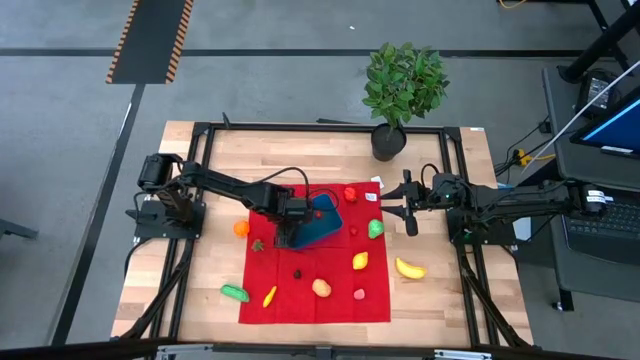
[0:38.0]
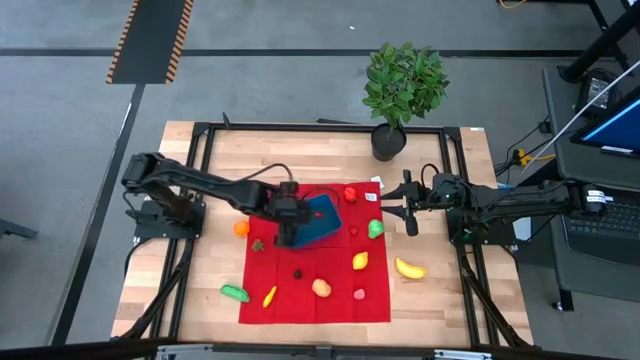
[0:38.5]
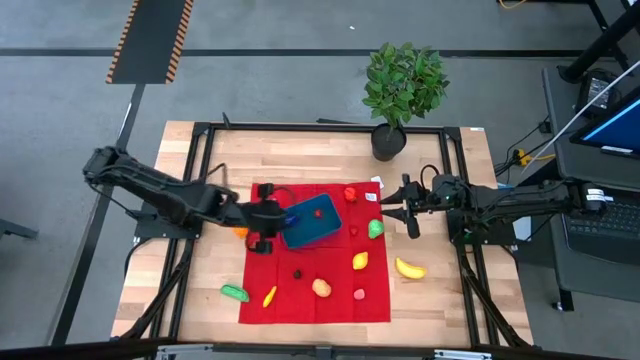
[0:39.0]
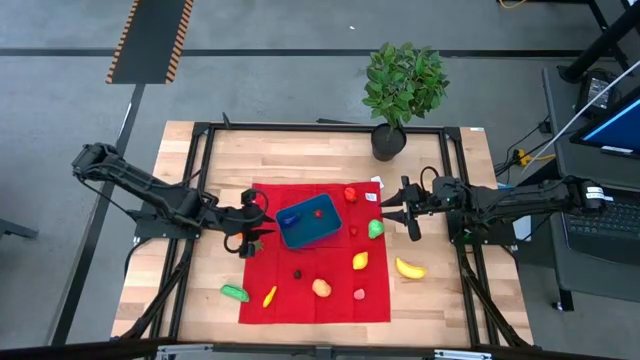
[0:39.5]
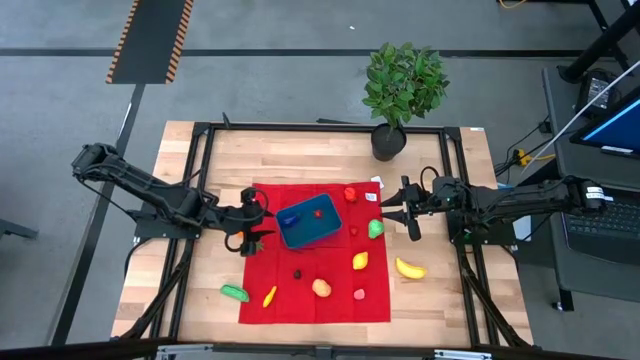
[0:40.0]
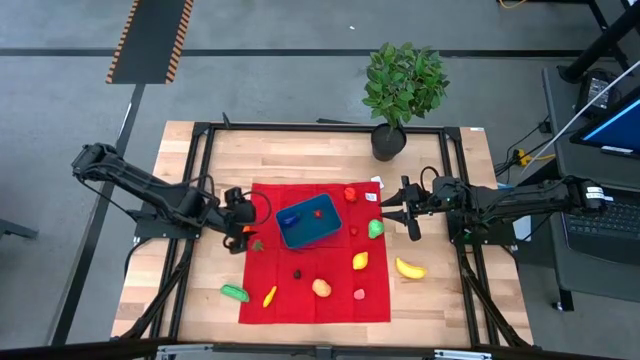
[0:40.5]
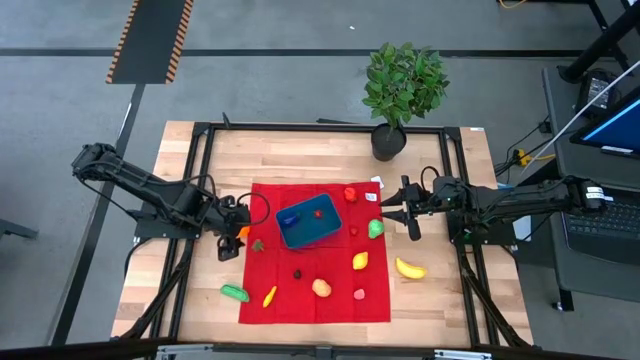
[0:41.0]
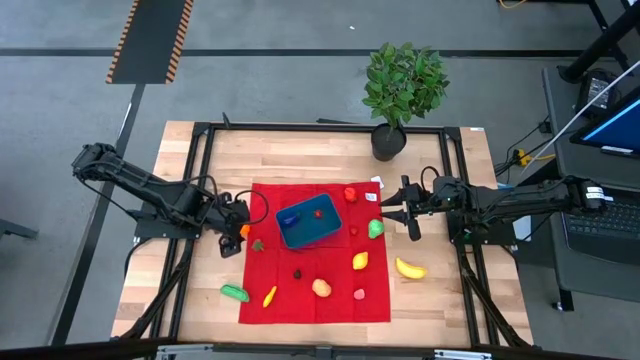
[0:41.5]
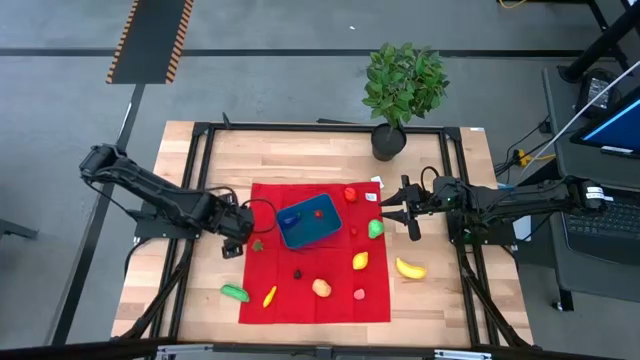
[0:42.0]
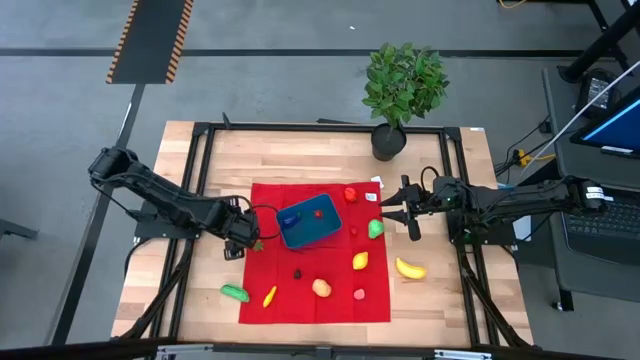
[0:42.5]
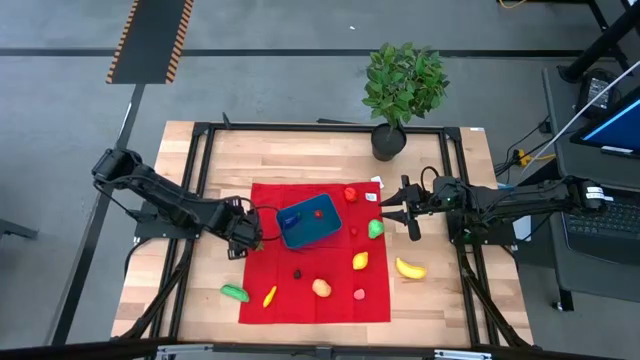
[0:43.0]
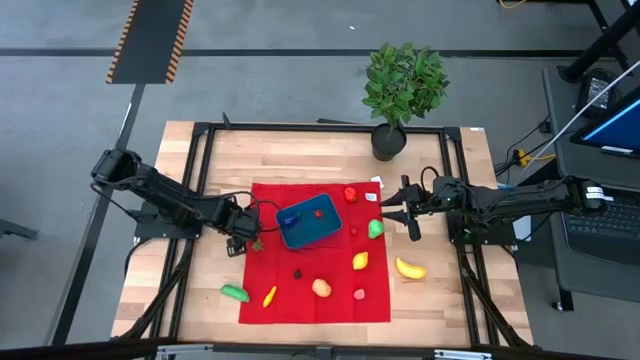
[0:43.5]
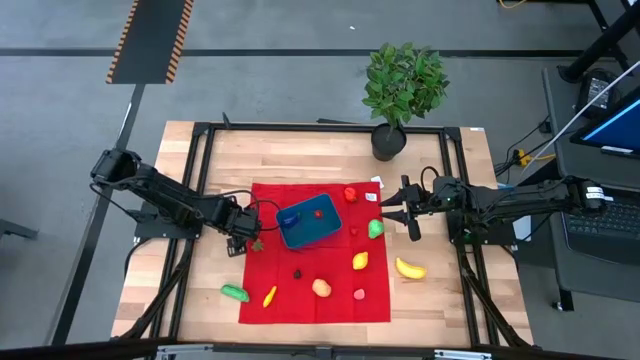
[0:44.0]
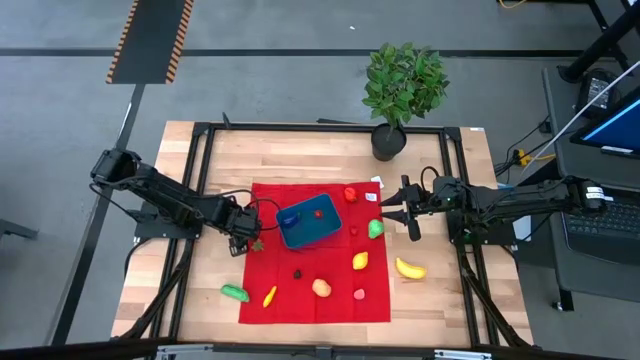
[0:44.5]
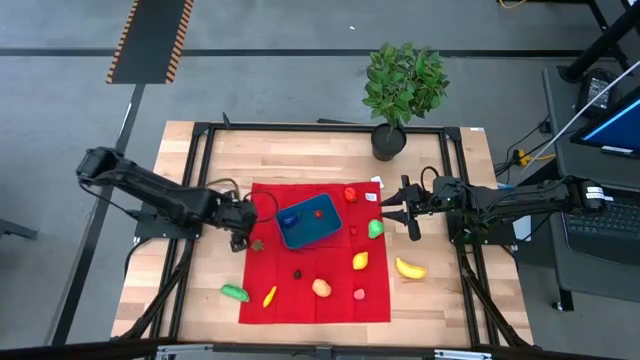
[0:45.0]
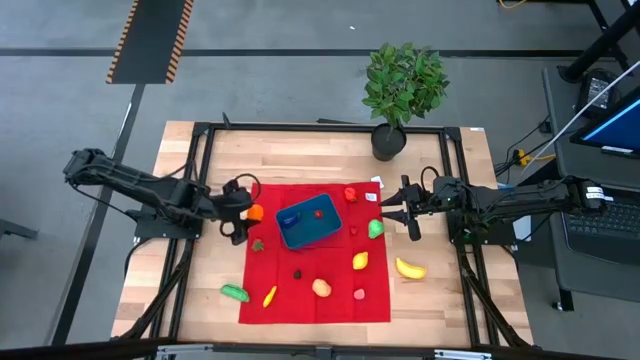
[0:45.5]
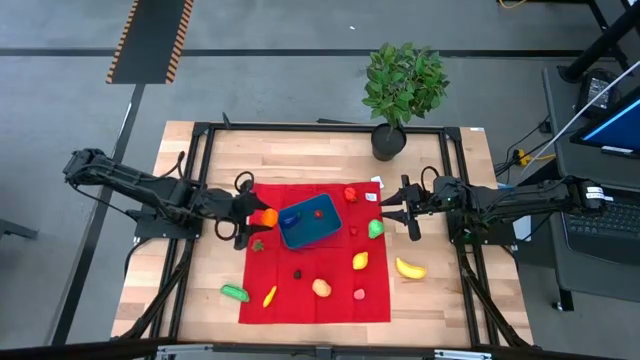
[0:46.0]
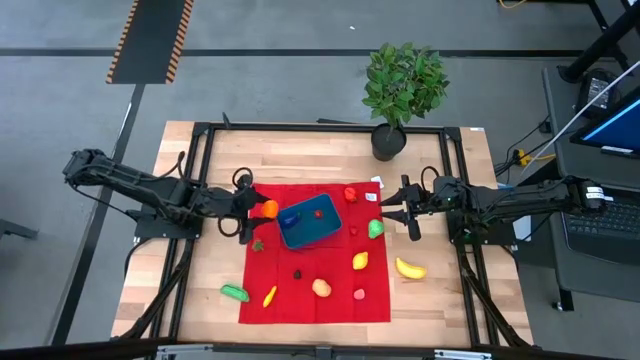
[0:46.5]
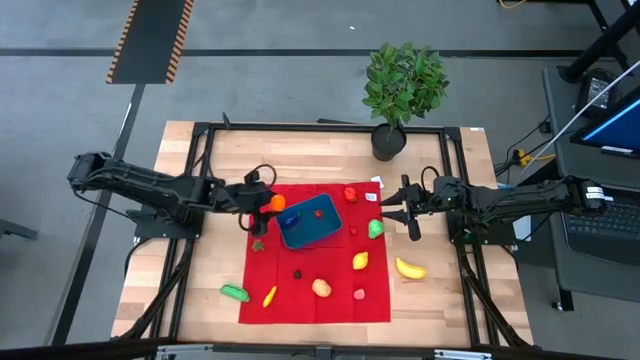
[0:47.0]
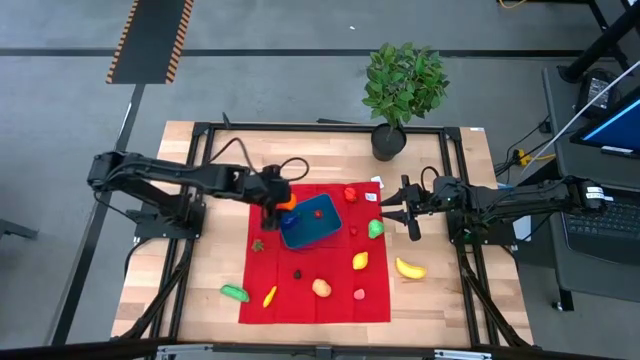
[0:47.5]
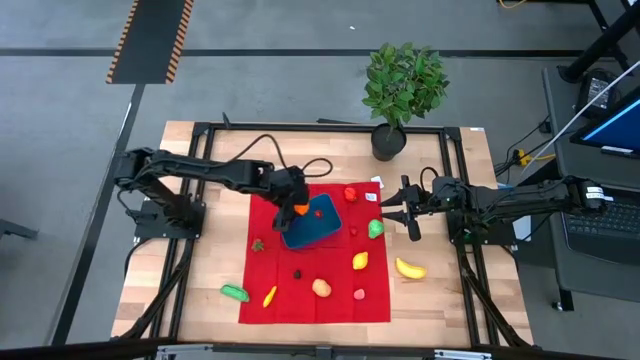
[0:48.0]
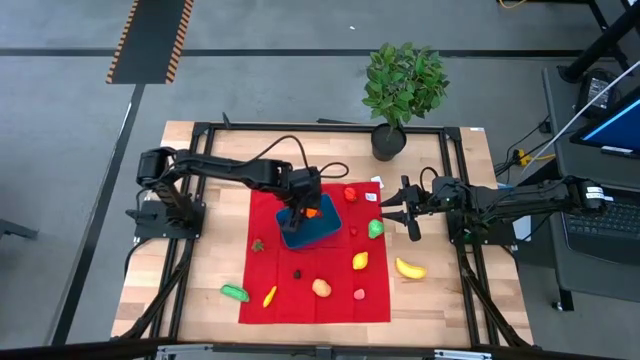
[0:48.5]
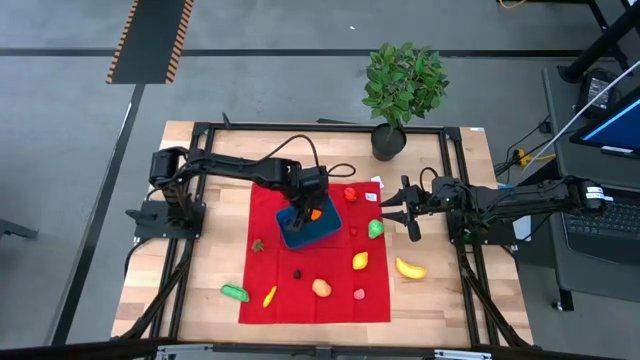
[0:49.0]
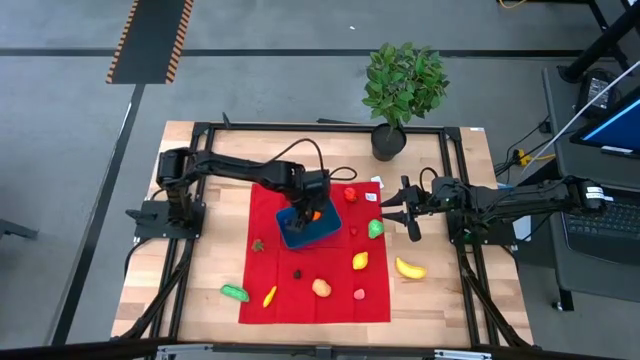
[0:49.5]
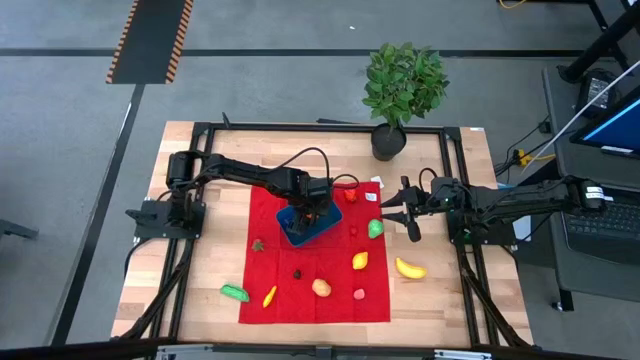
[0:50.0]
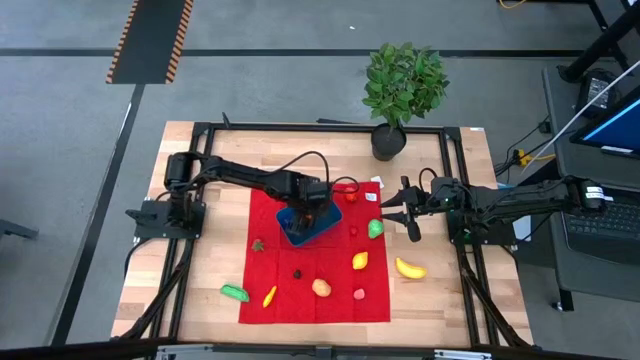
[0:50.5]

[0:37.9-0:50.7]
Task: Pick and placing Produce into tupperware
Put the pumpkin into the blue bin

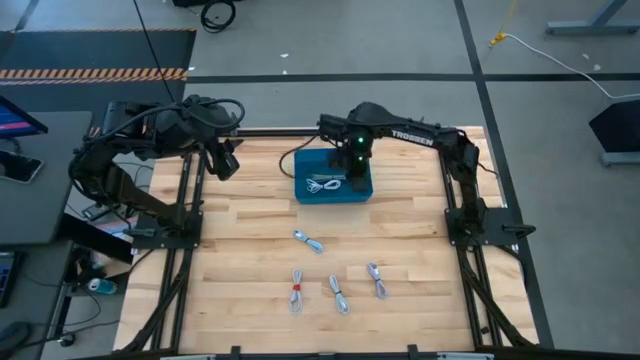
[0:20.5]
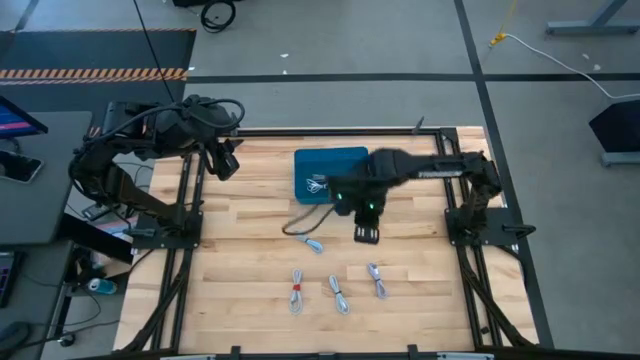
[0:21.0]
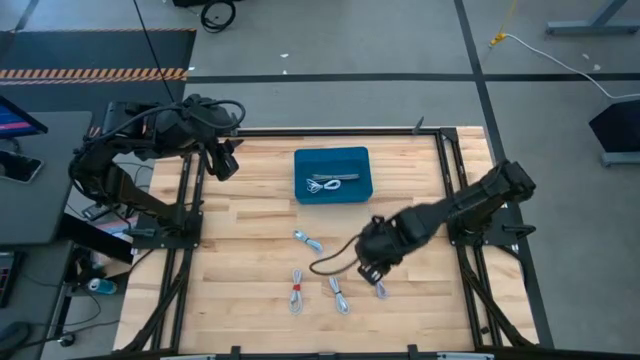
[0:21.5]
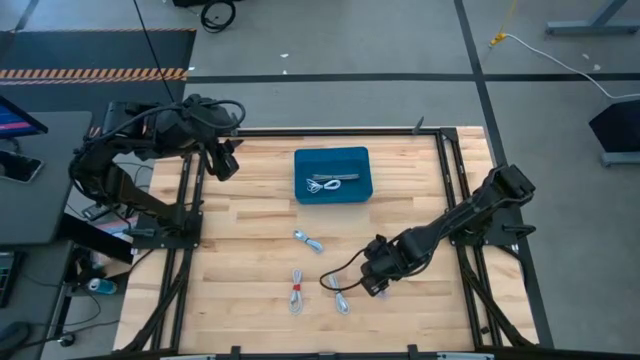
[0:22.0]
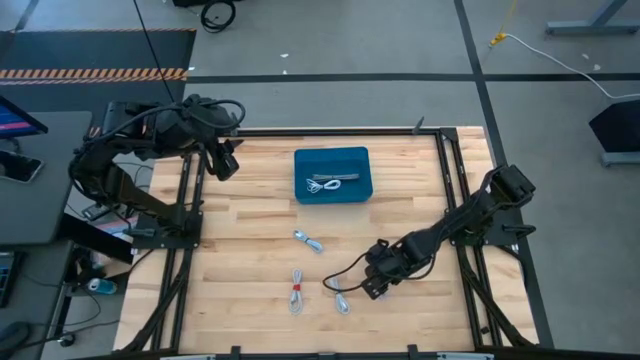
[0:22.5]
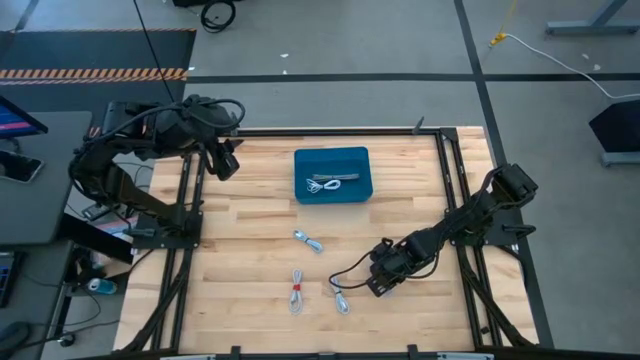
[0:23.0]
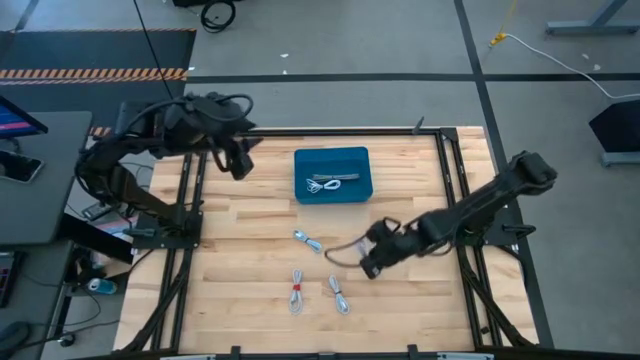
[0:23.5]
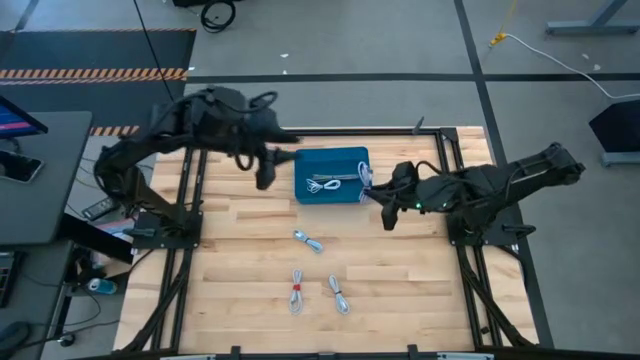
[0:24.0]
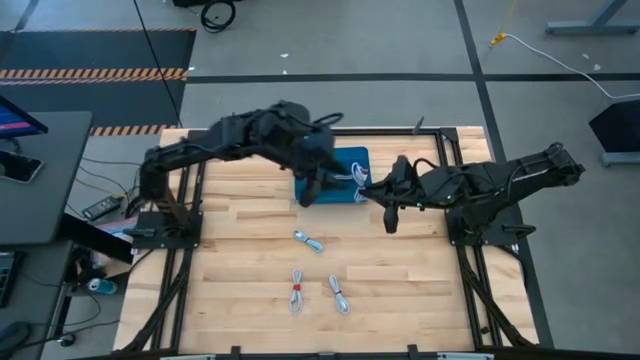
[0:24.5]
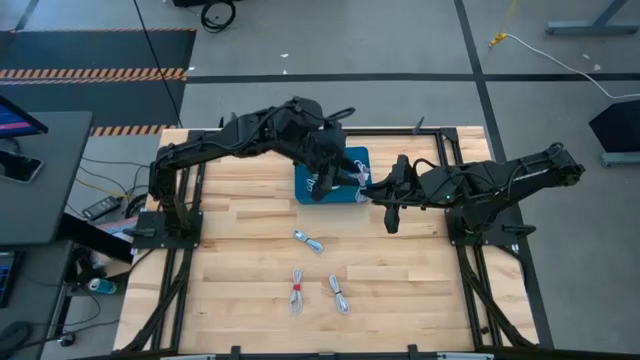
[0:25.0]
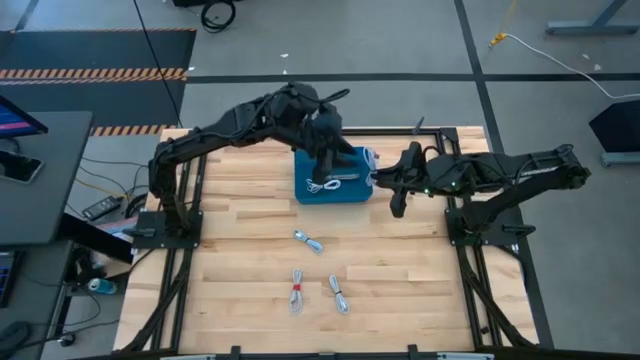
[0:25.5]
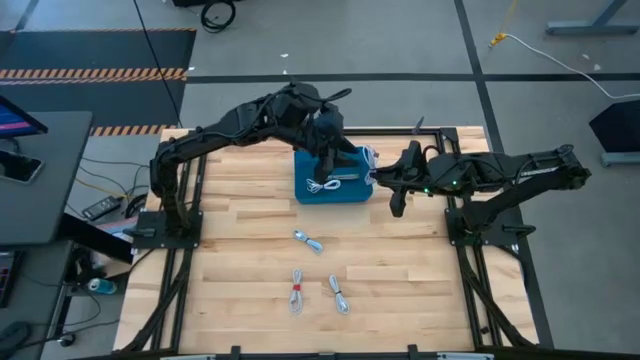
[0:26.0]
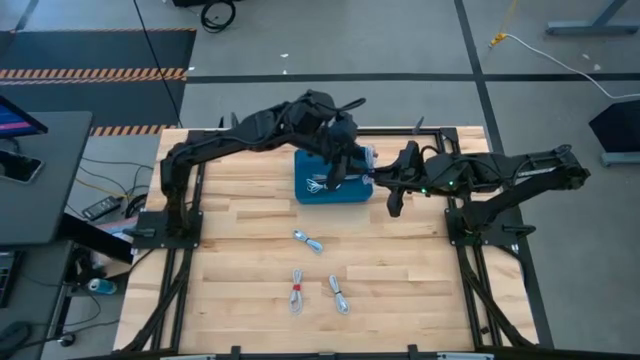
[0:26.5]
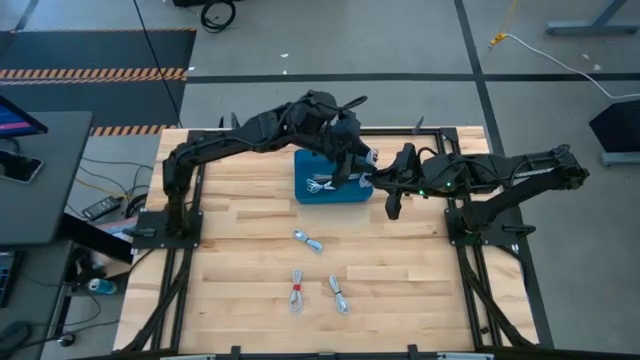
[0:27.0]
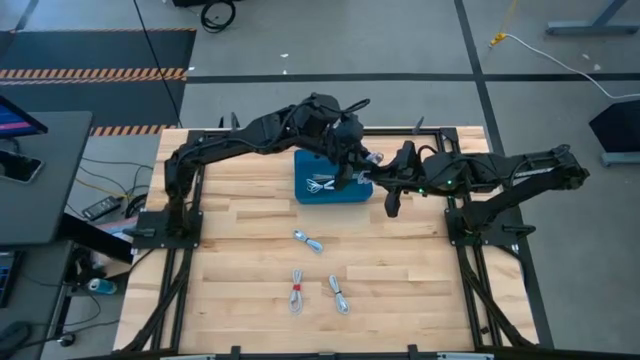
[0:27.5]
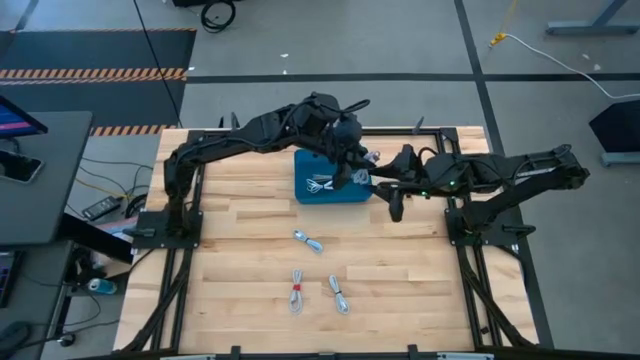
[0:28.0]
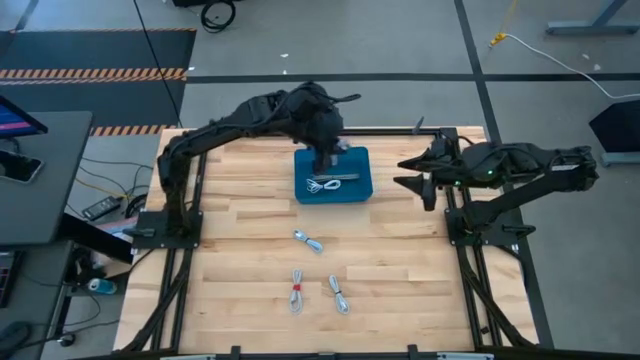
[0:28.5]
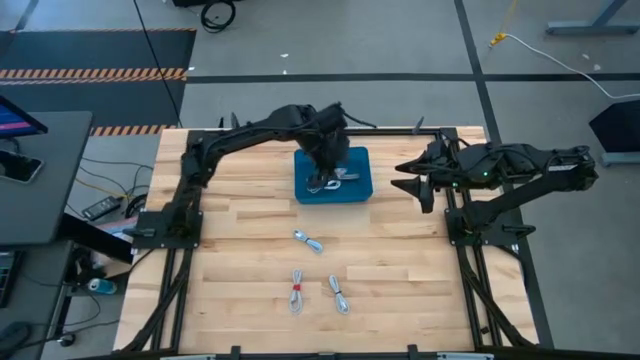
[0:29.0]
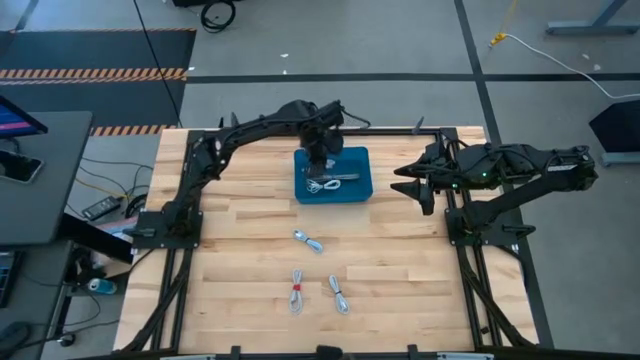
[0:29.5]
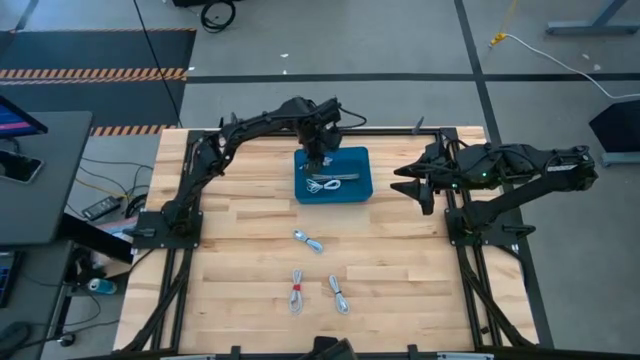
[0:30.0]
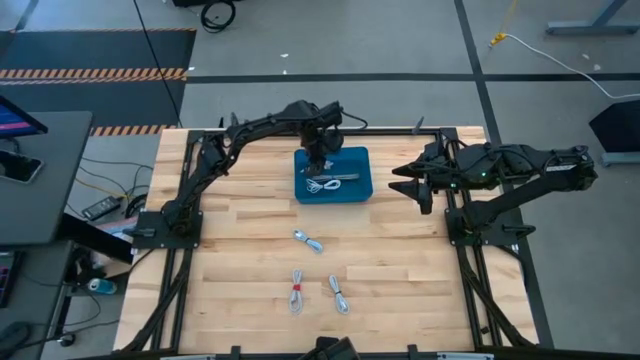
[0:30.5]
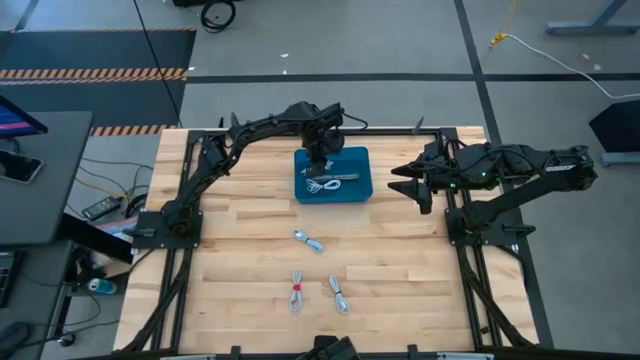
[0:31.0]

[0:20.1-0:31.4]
Task: Pick and place USB-C Cables
Put the purple charger cable into the blue bin
